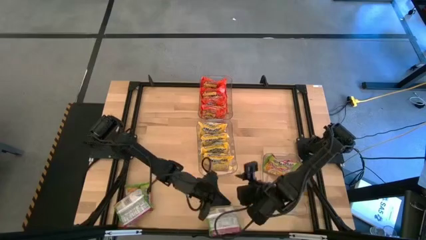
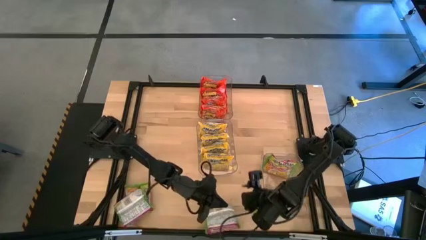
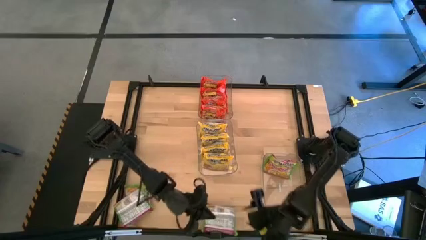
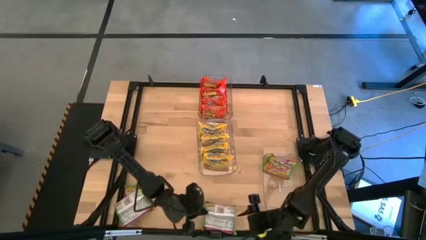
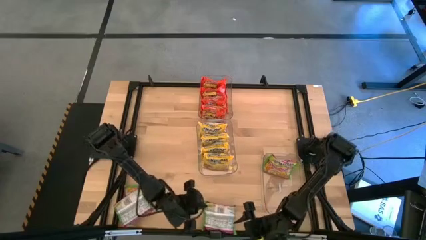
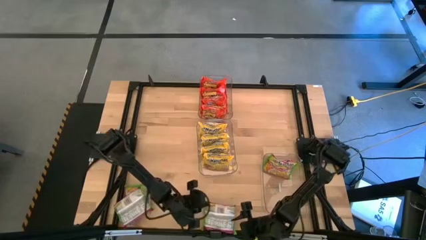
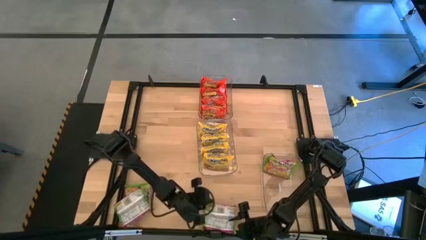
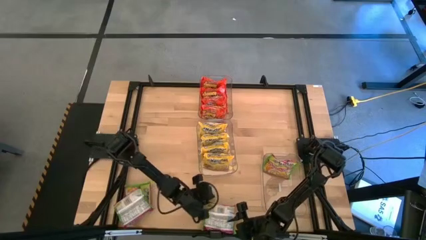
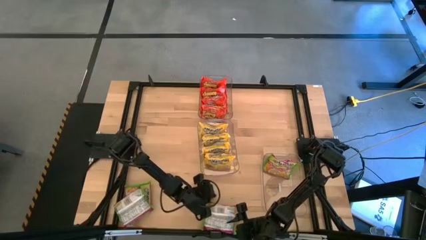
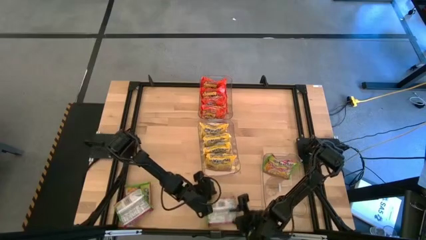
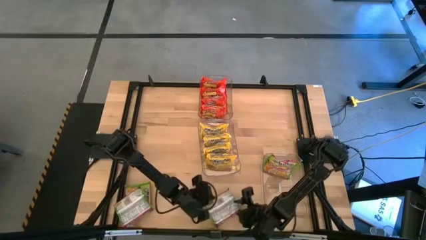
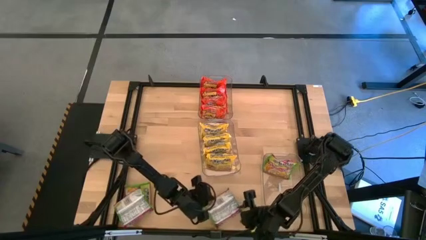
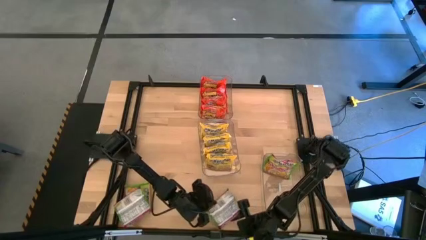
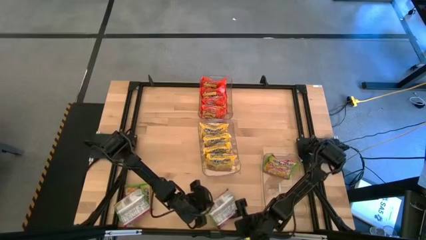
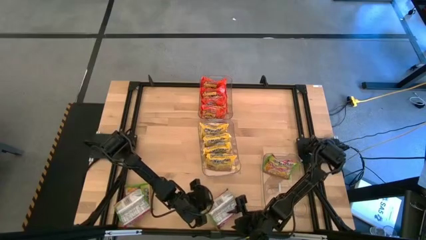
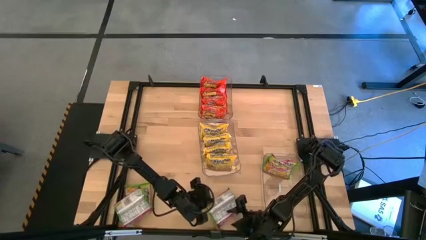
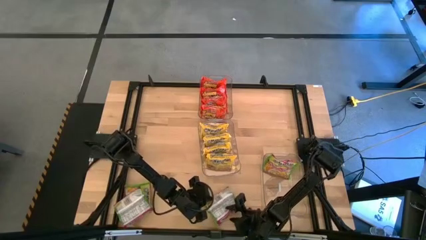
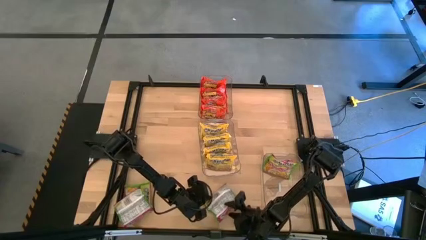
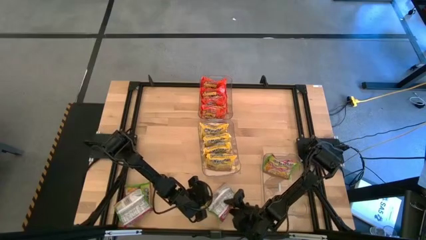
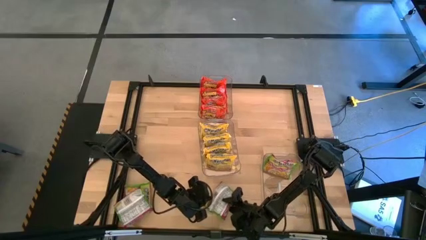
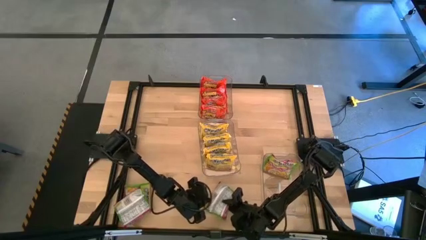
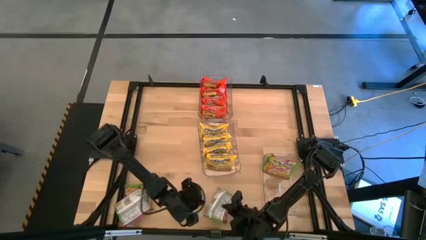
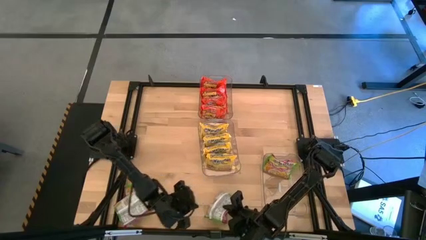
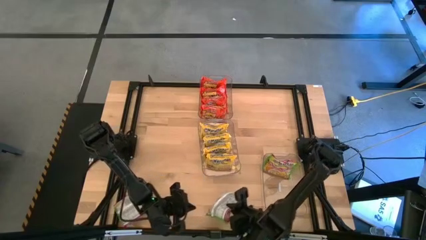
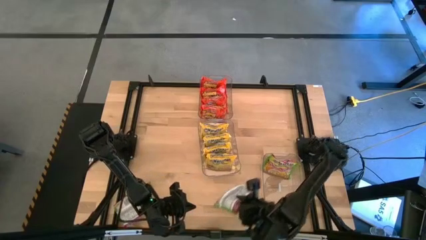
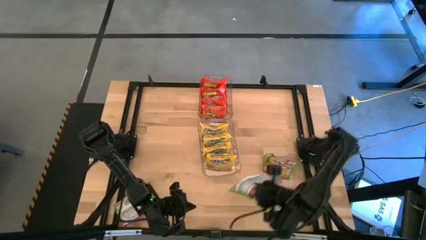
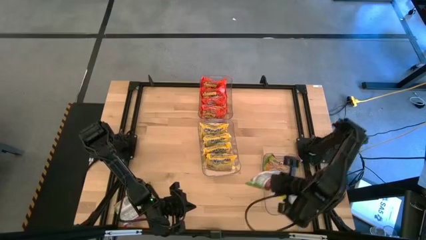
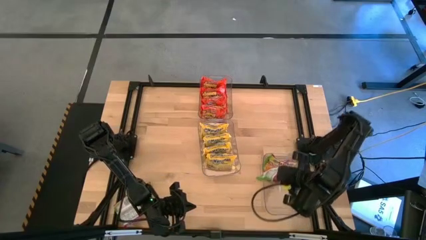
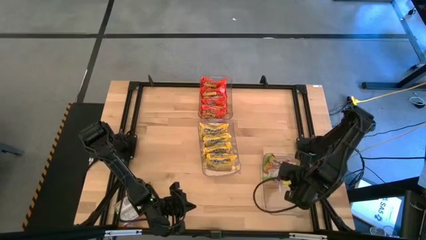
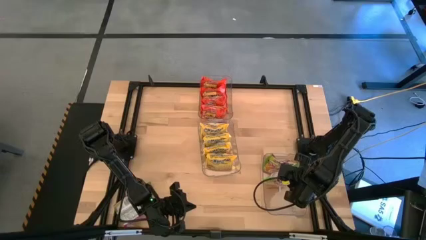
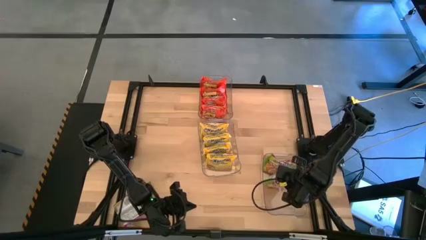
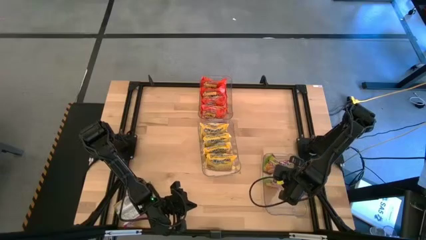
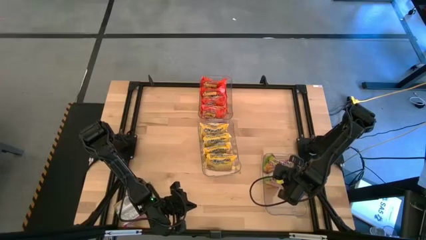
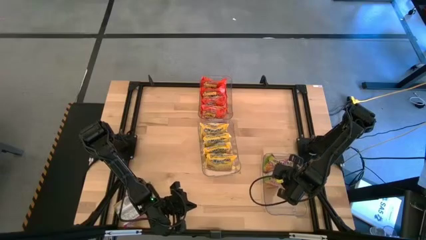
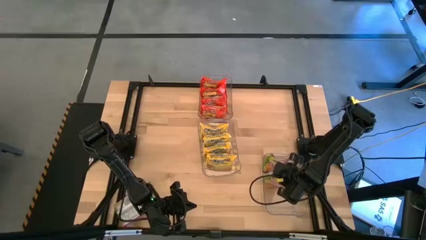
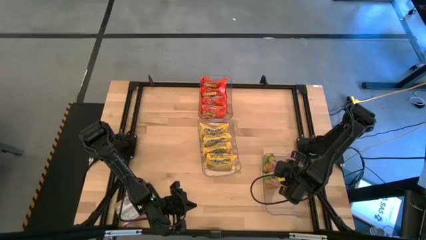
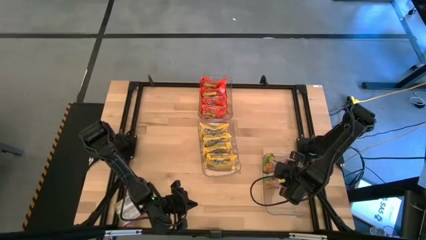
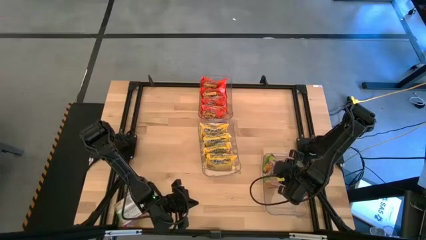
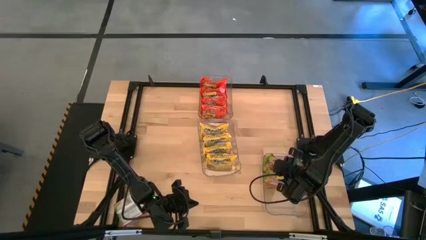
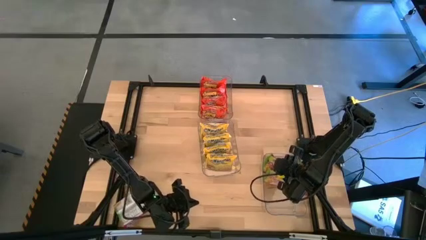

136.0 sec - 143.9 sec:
Task: Sort Maruchan noodles
Put the green noodle pack into the bottom transparent bin

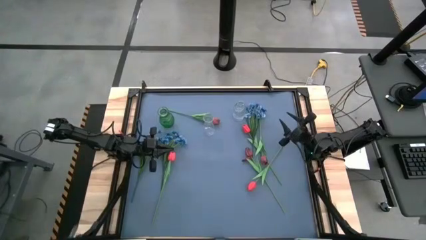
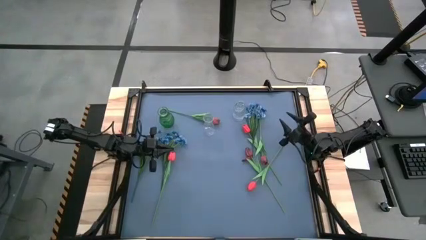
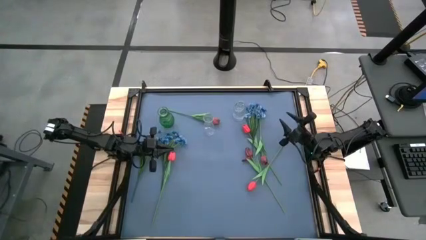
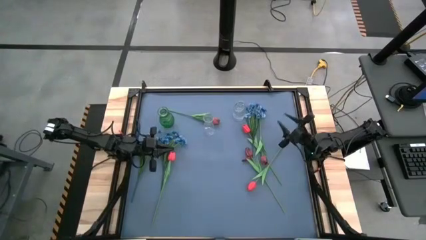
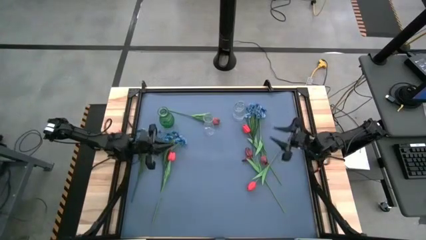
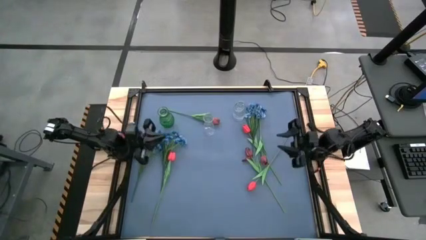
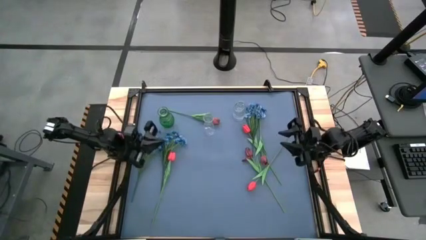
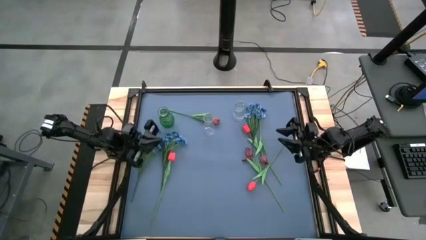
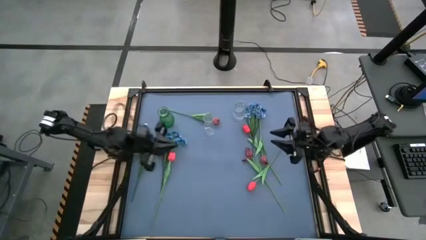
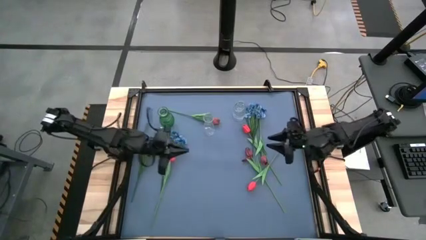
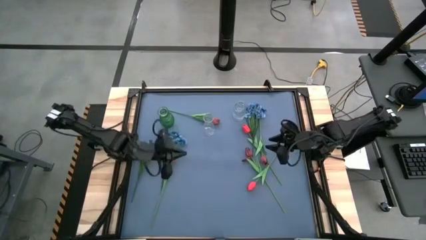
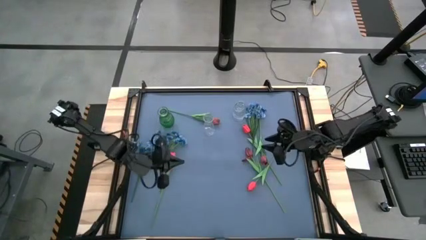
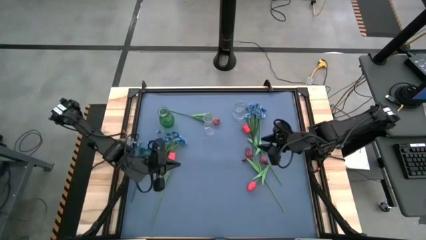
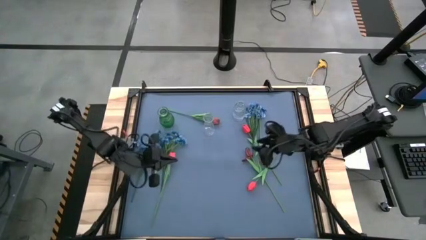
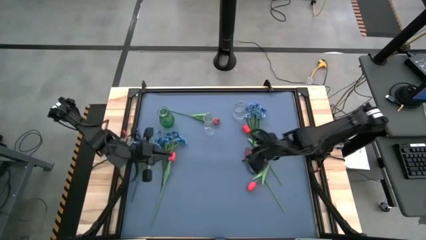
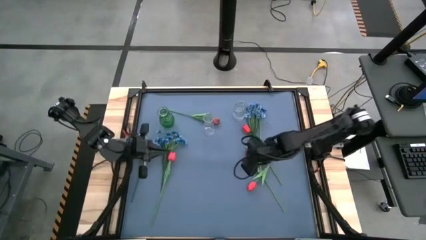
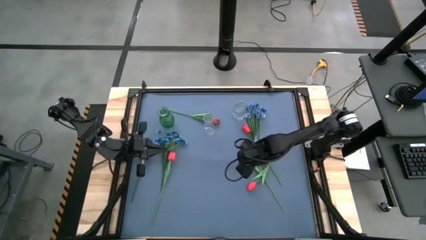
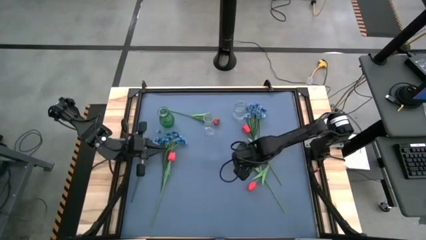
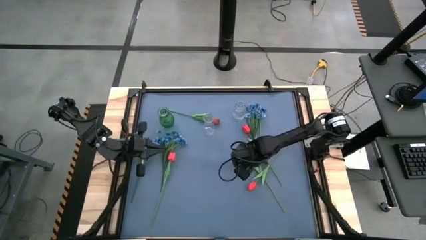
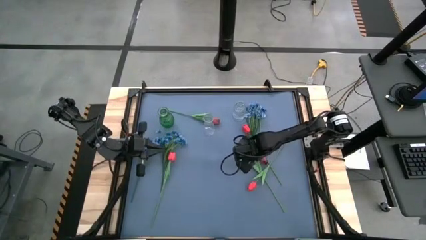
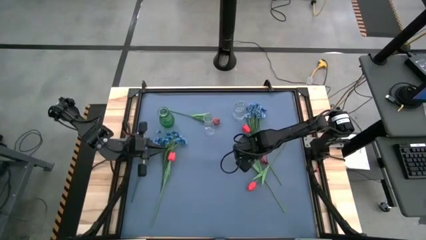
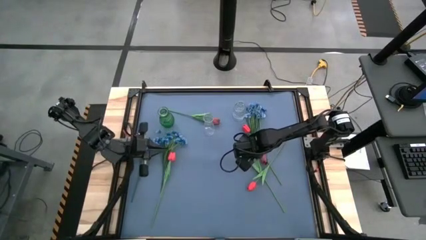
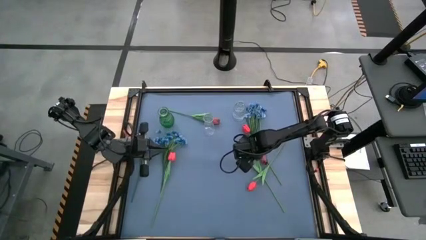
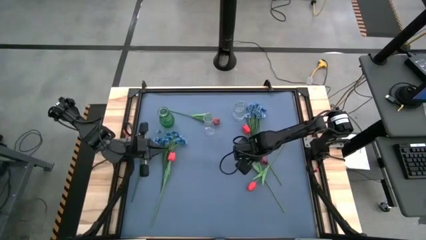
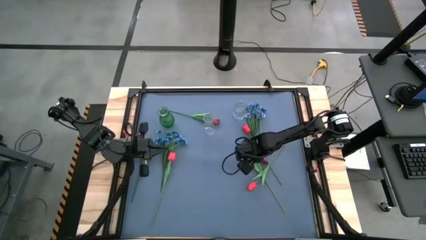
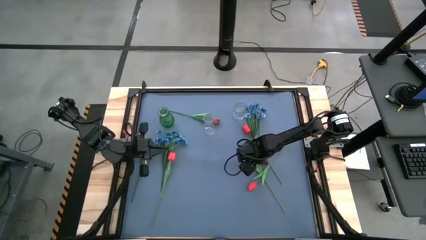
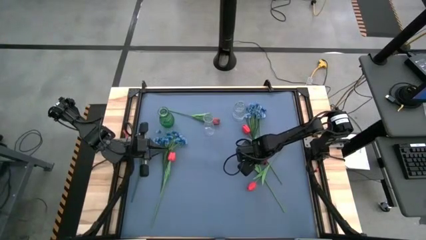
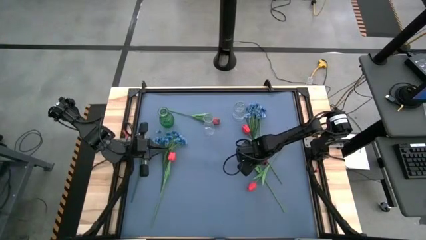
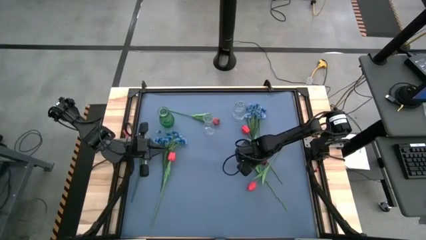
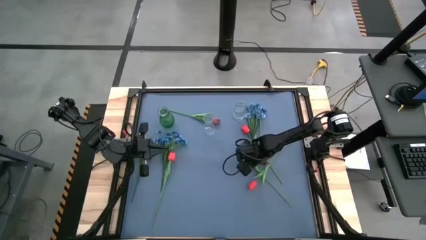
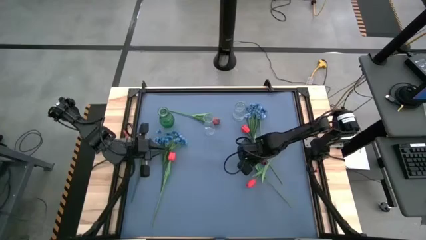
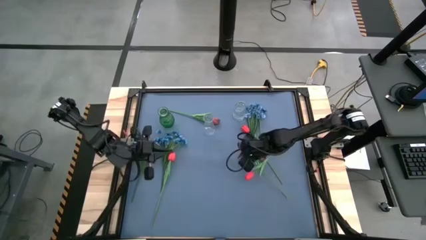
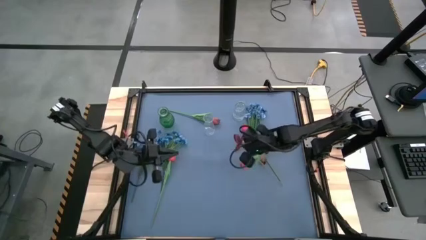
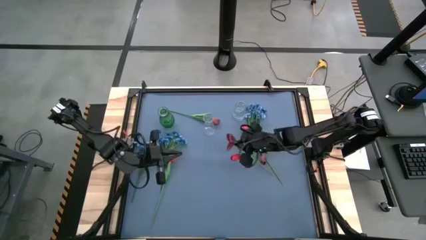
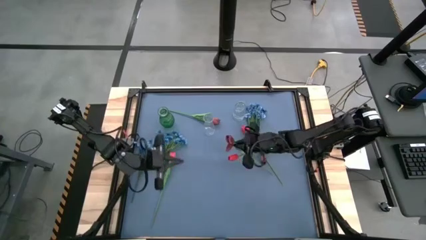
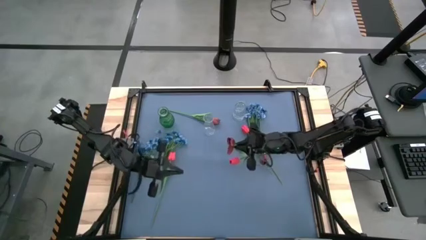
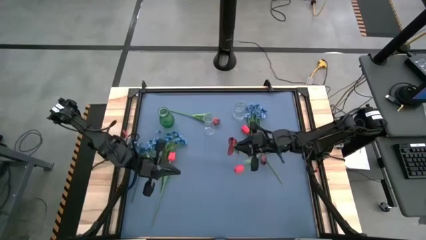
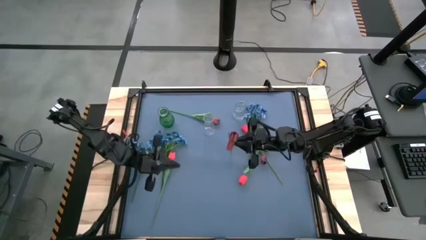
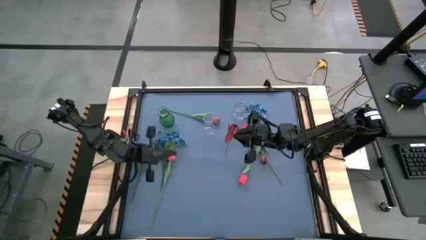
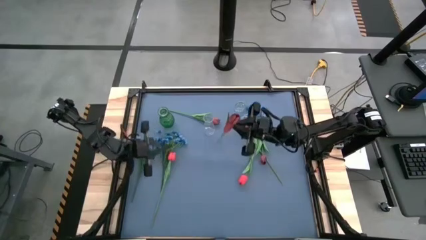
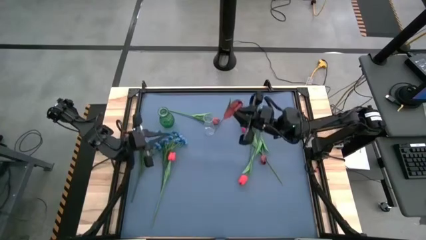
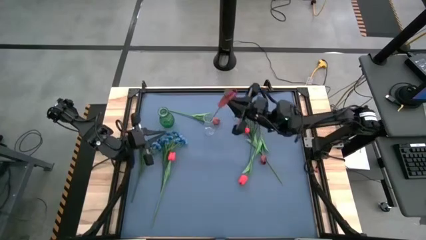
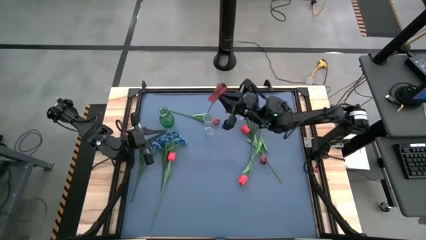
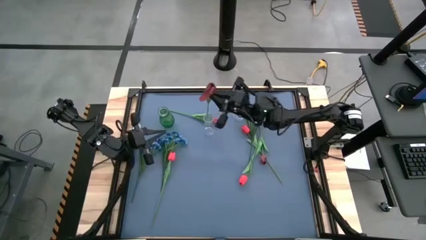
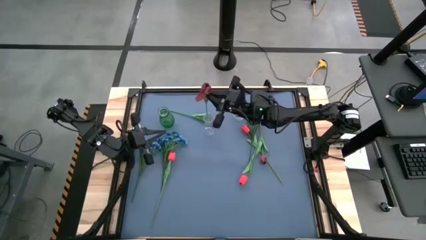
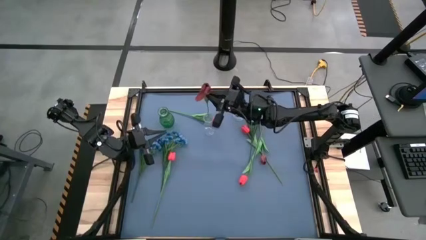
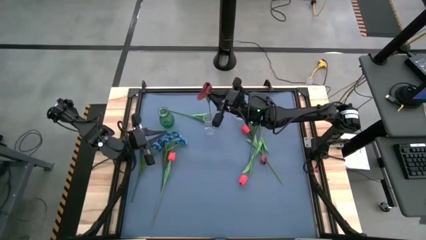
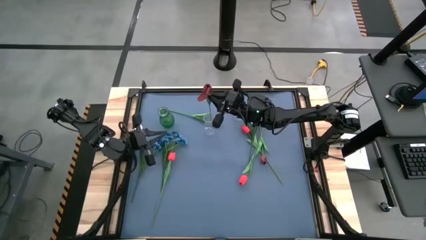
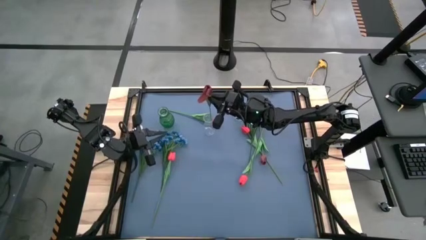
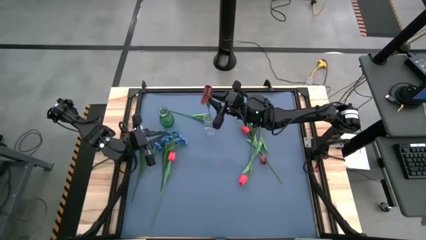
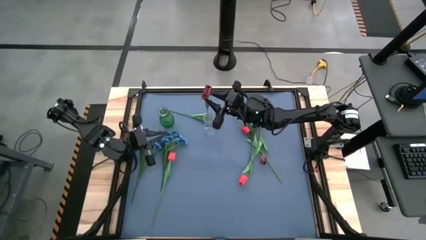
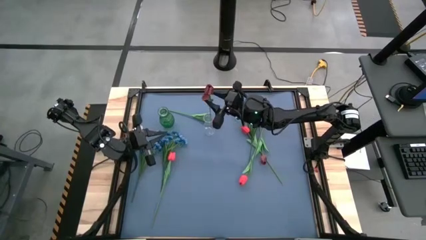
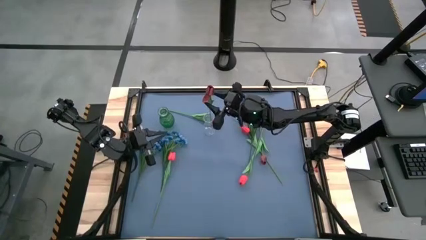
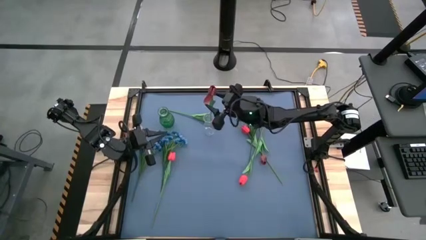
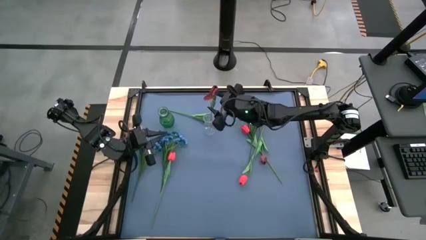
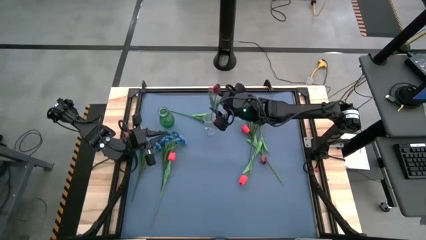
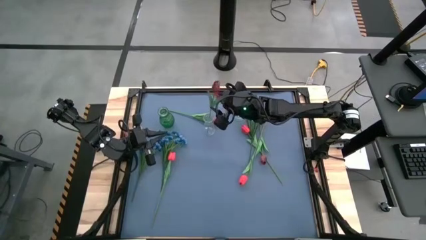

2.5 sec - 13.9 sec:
Task: Sort flowers into vase by color
Put the middle dark red tulip into the bottom transparent vase
